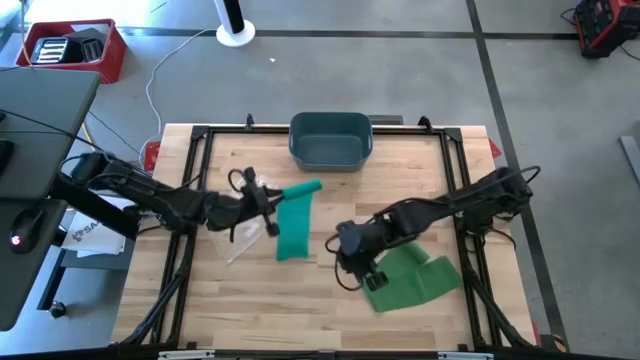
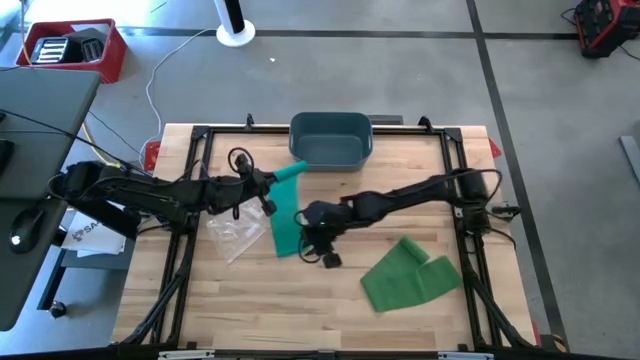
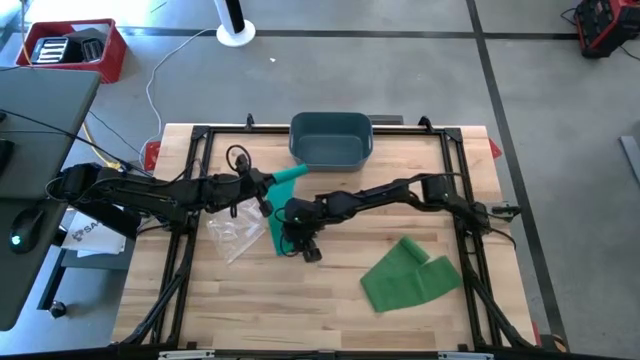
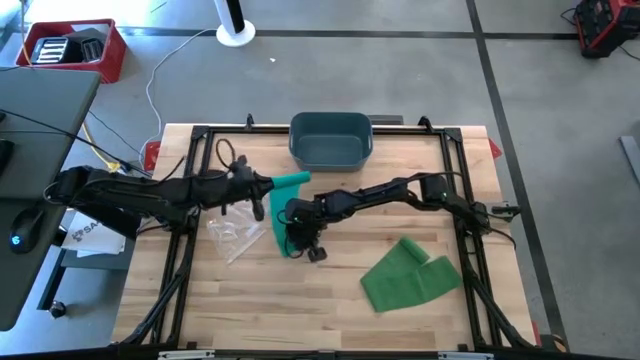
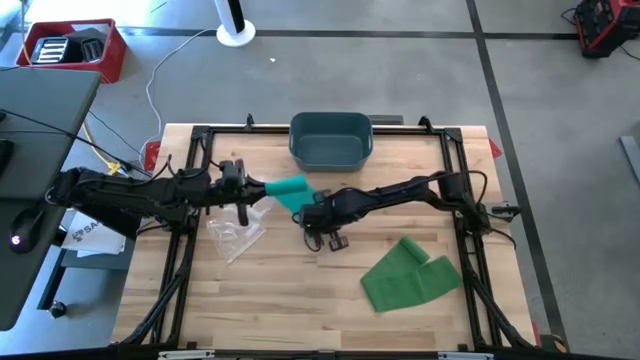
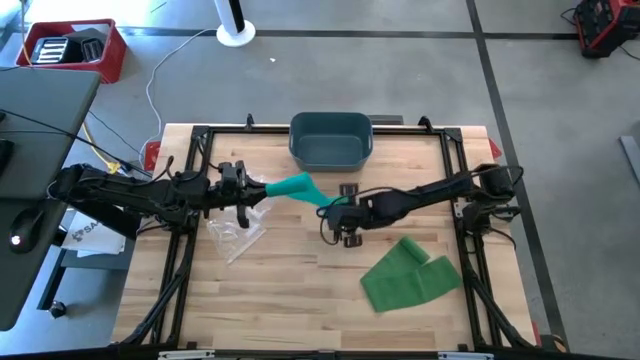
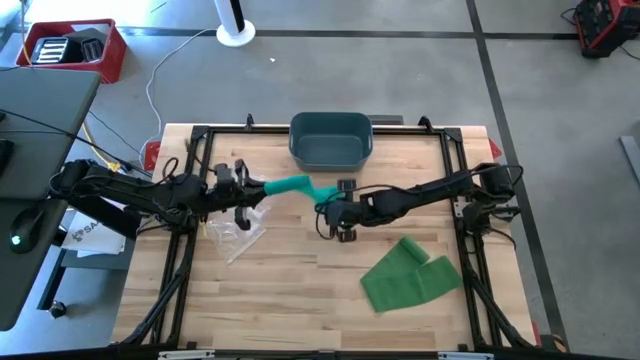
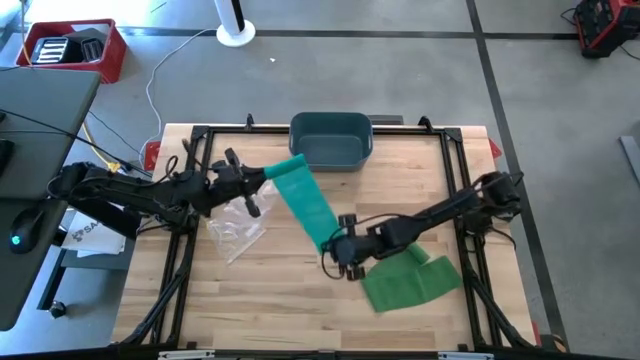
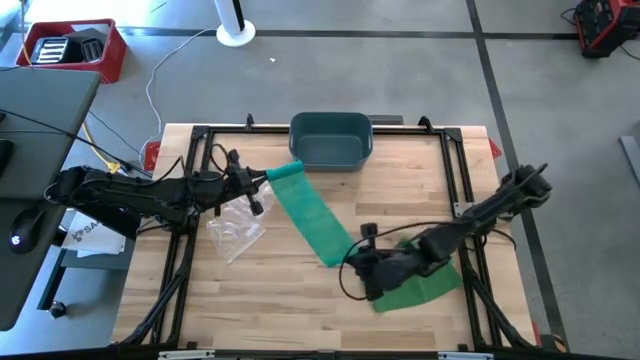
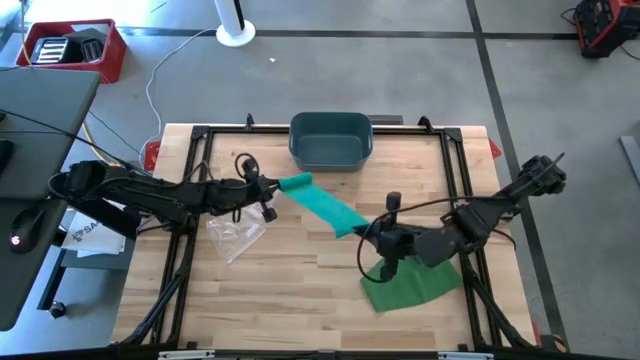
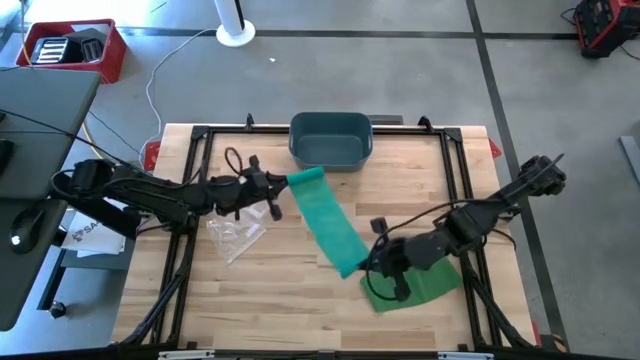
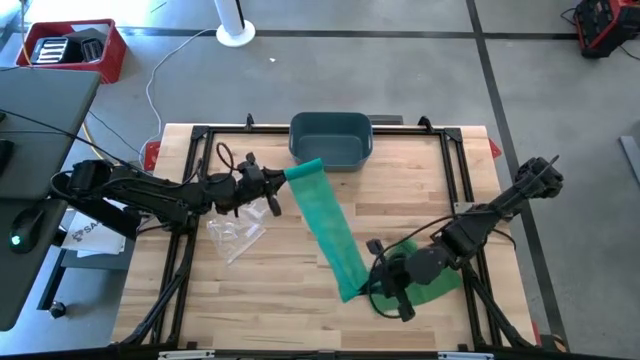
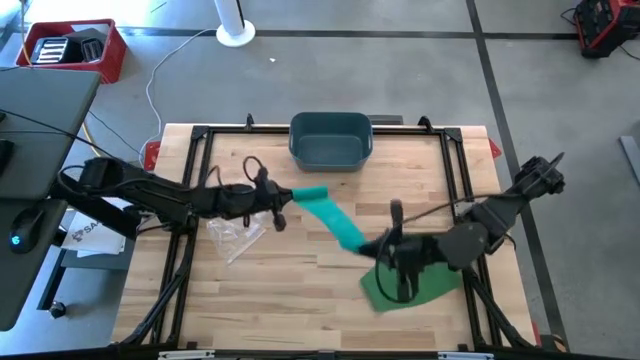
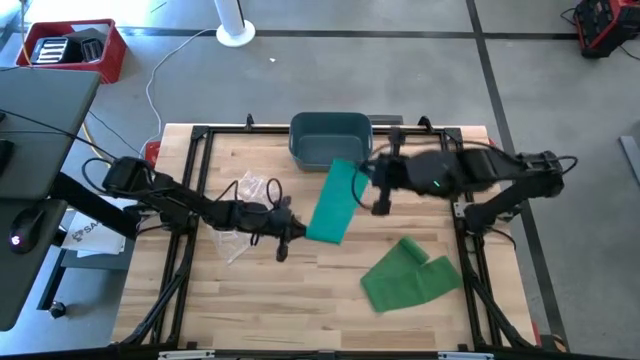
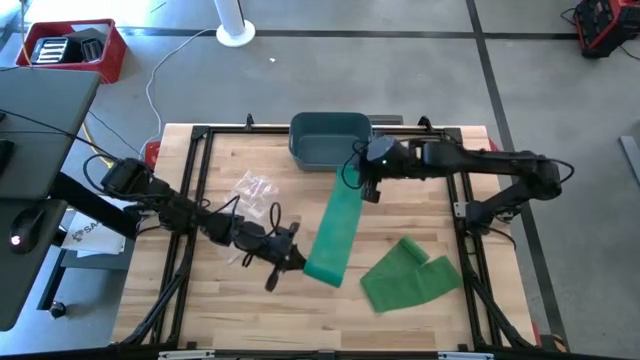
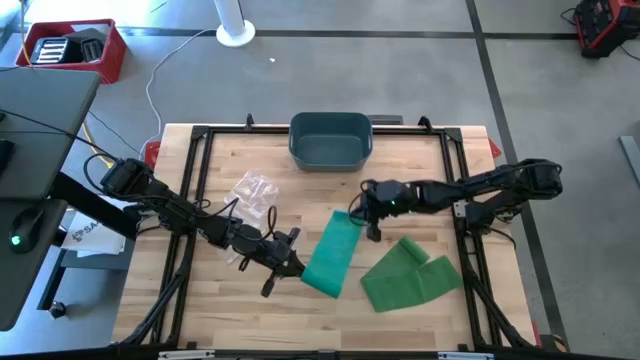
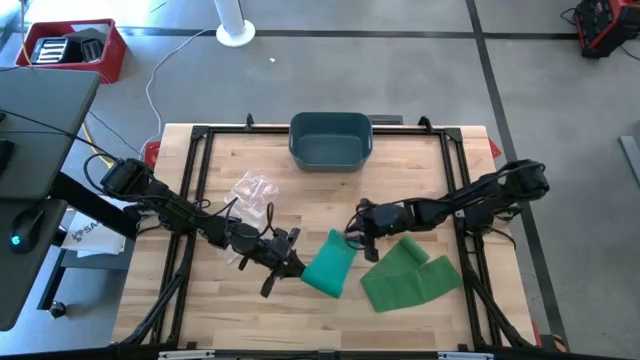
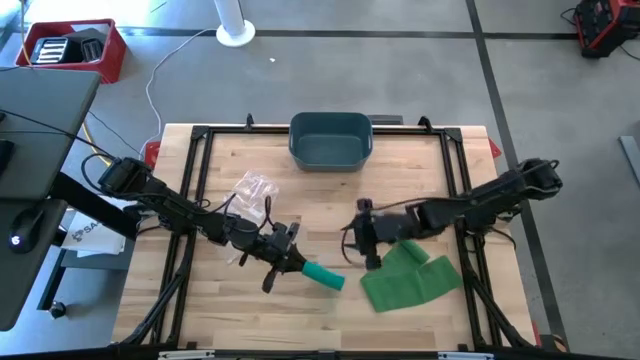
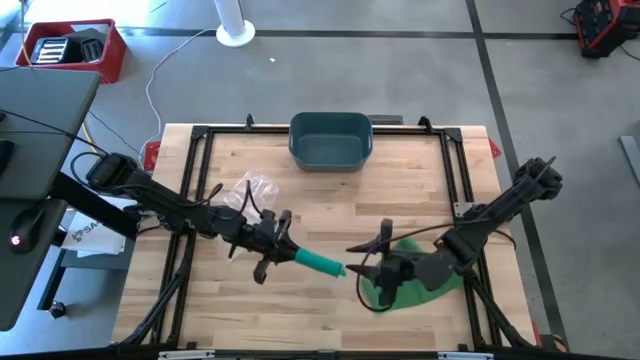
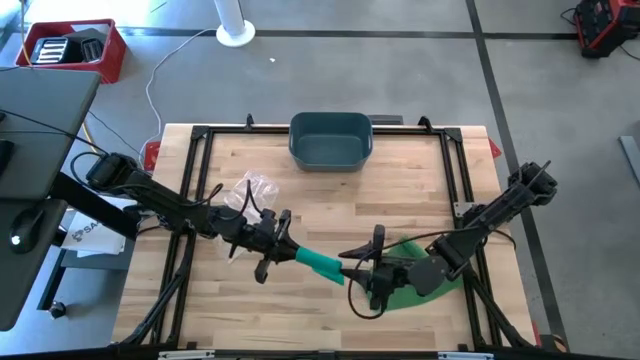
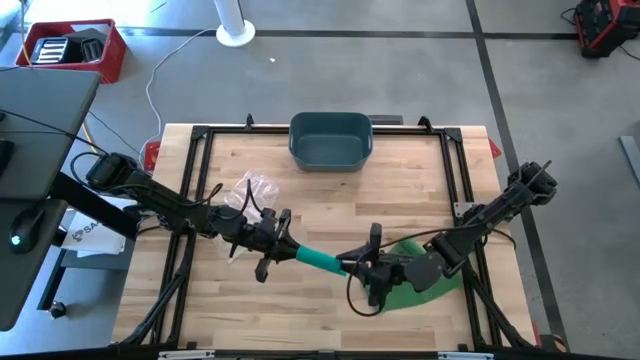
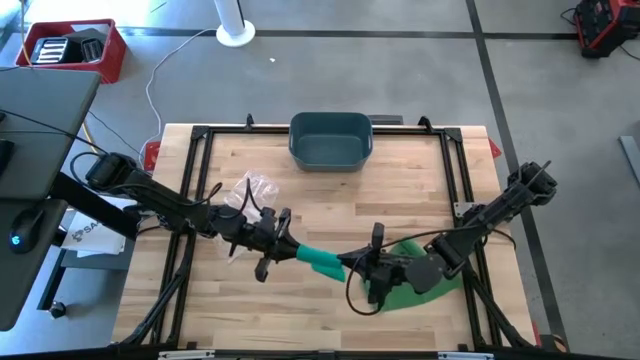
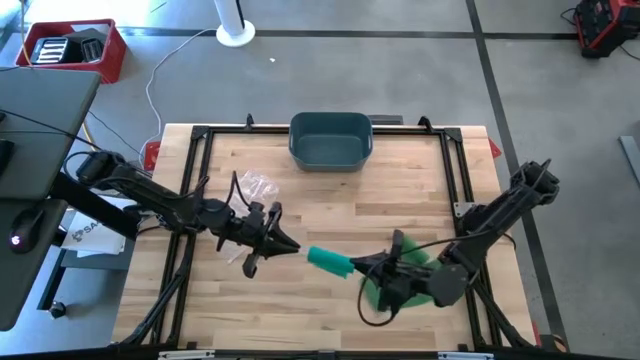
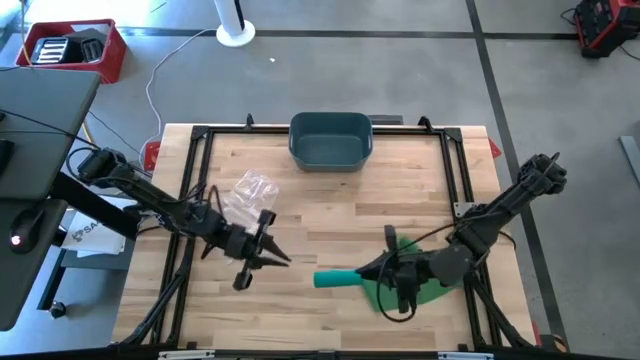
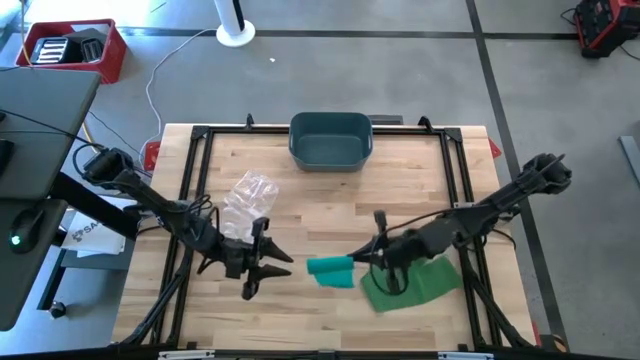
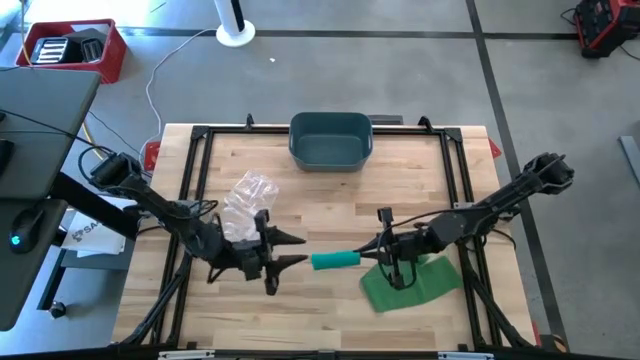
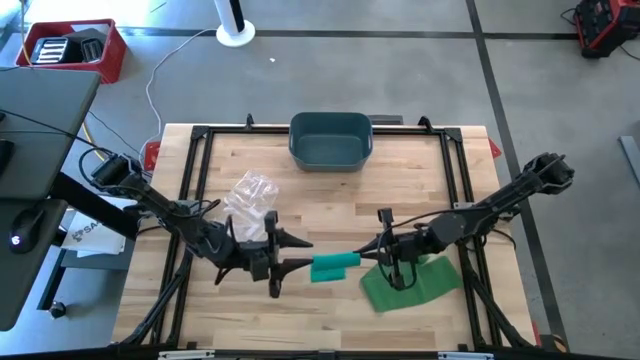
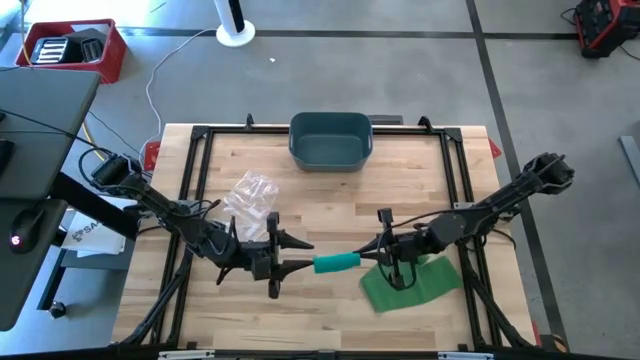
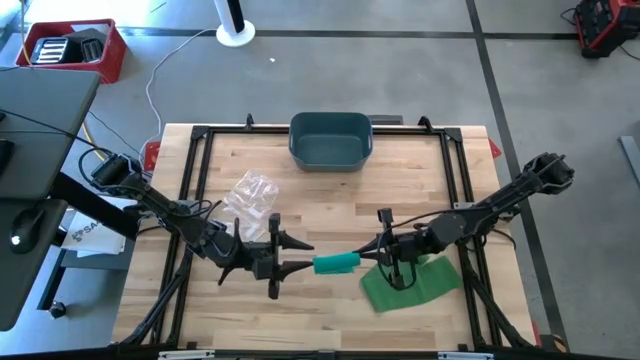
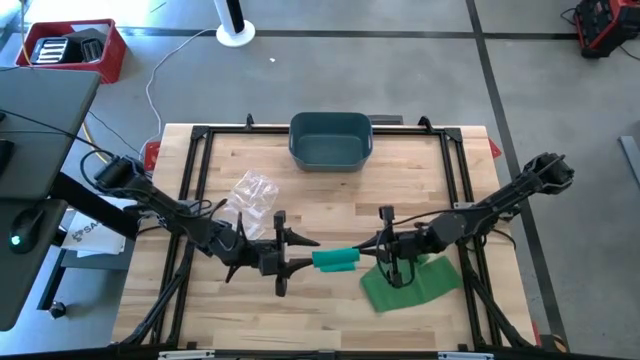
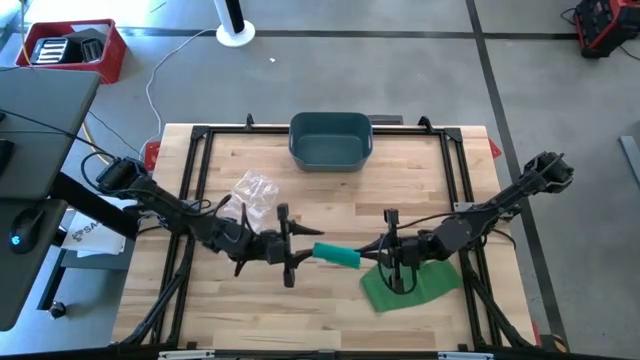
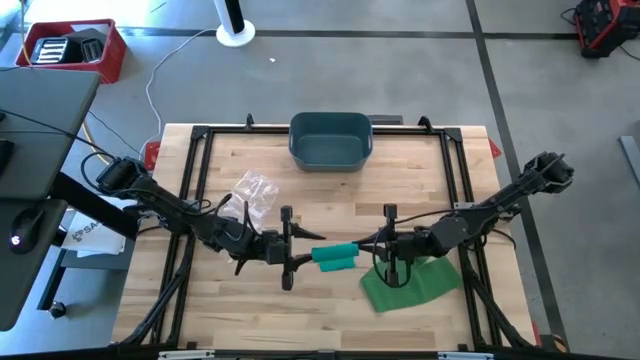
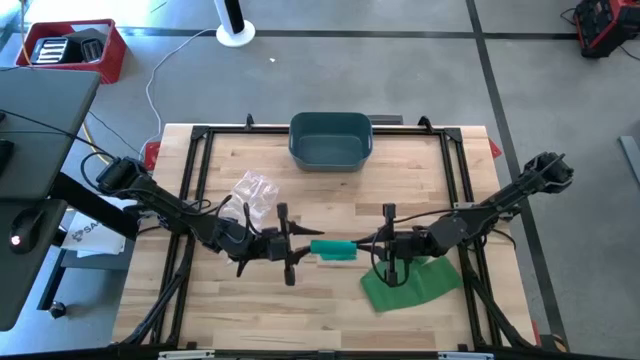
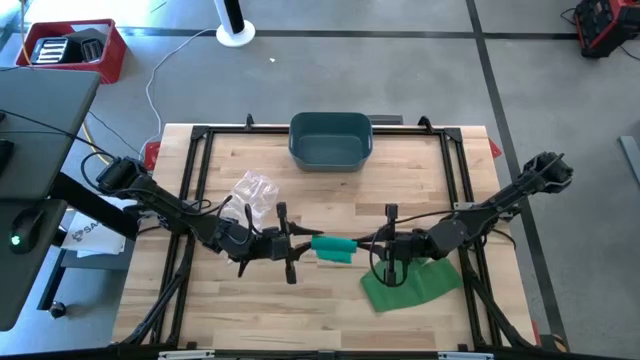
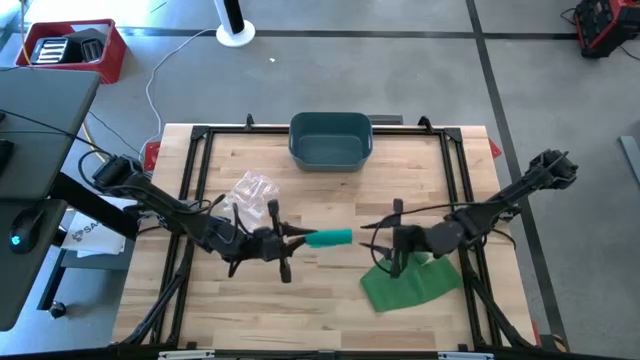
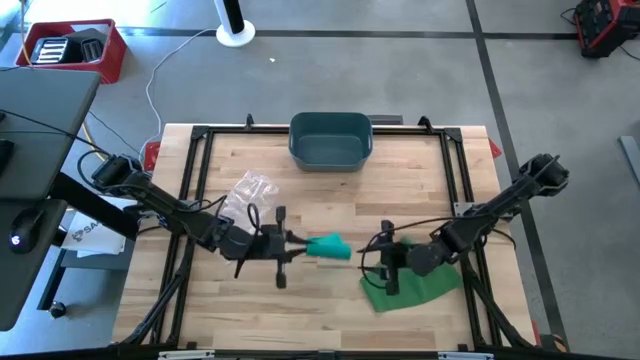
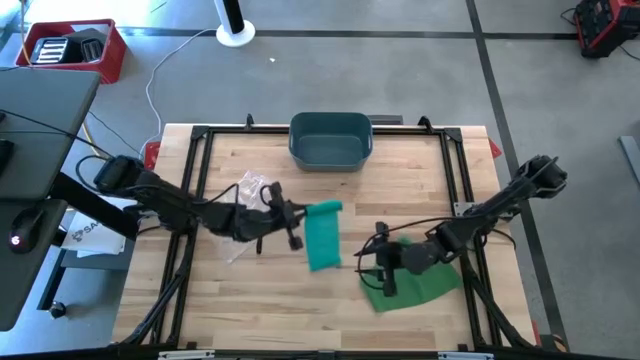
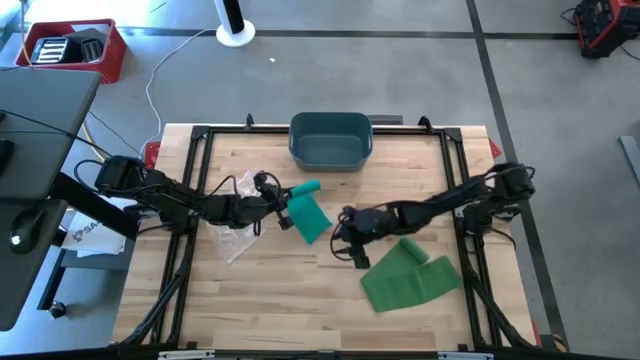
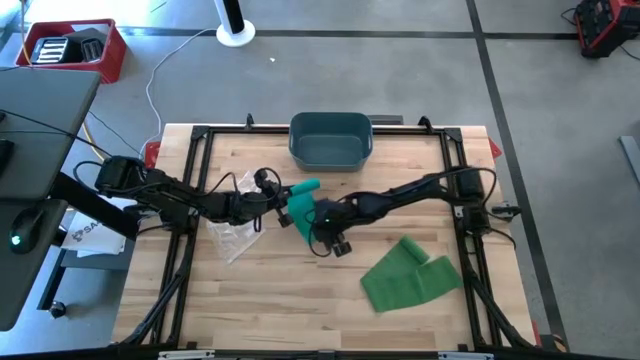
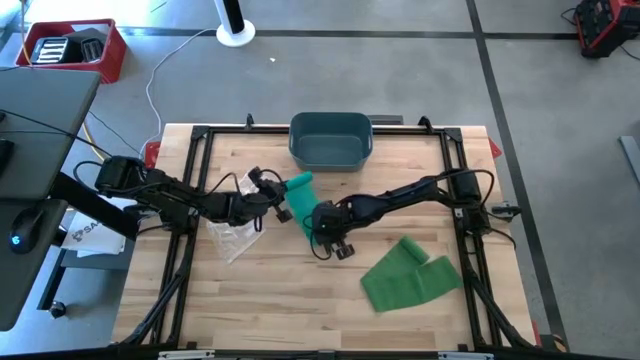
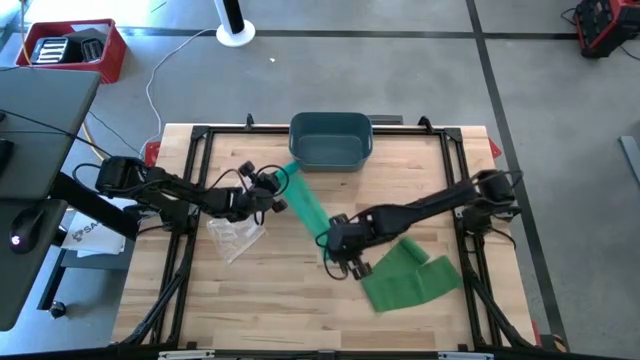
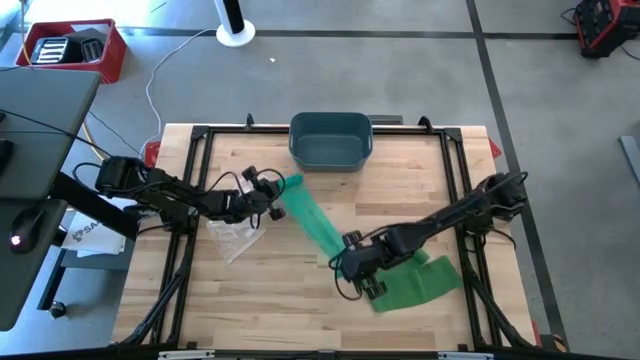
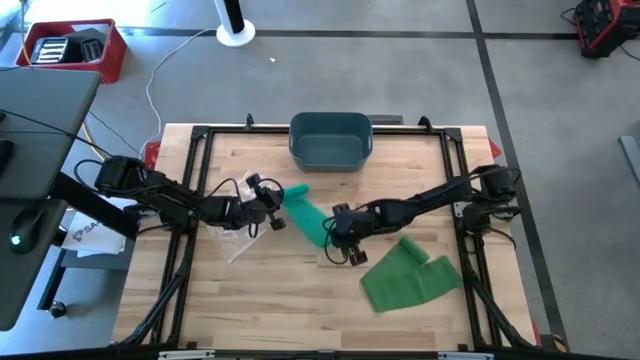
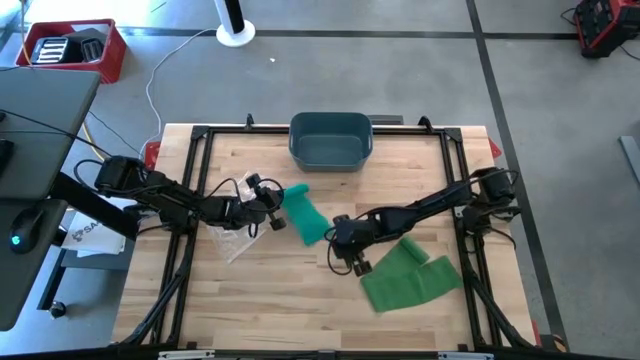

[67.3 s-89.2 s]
Task: Roll bandage
Roll the blue bandage
